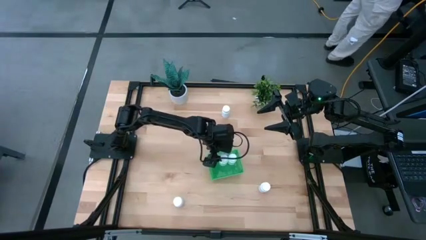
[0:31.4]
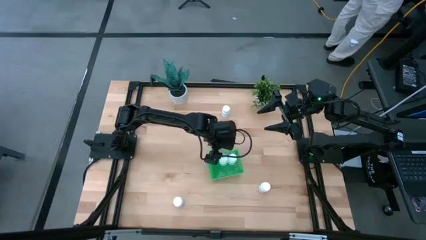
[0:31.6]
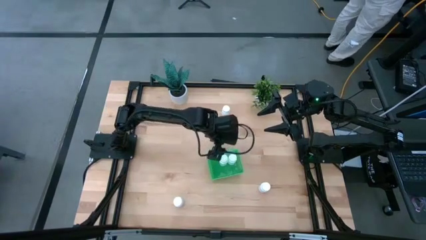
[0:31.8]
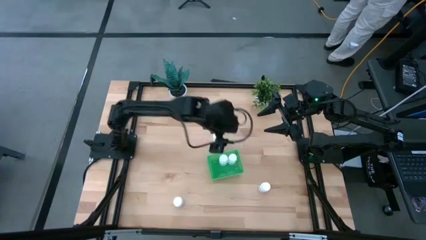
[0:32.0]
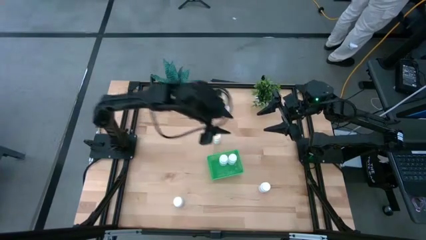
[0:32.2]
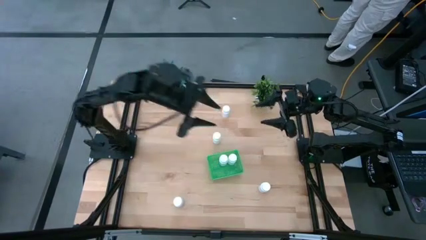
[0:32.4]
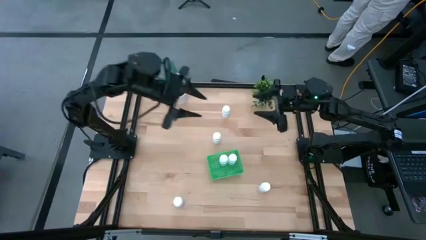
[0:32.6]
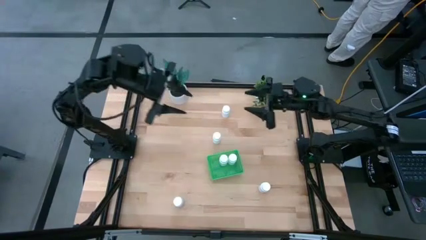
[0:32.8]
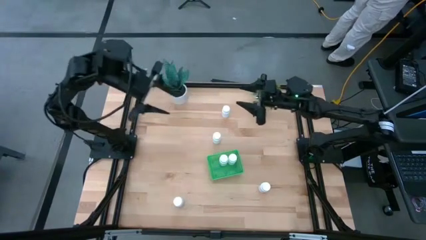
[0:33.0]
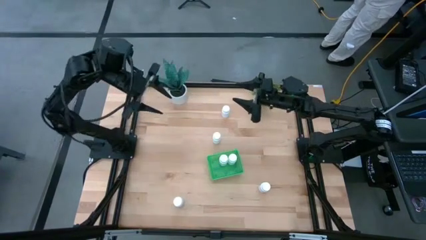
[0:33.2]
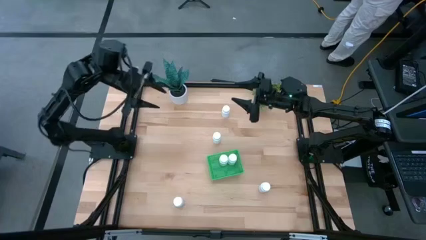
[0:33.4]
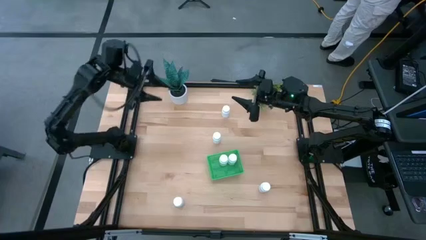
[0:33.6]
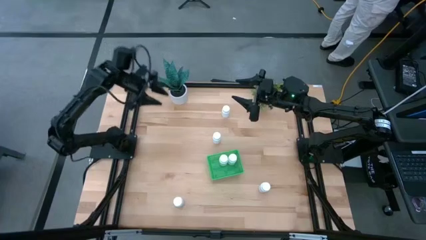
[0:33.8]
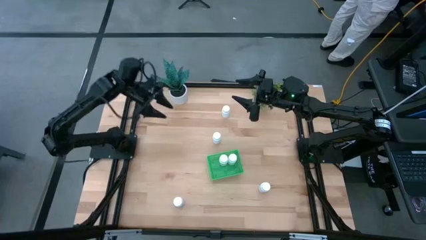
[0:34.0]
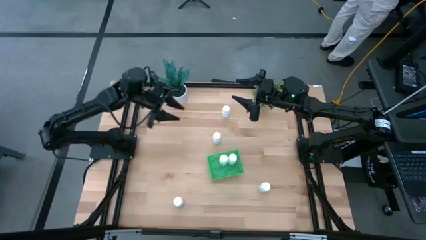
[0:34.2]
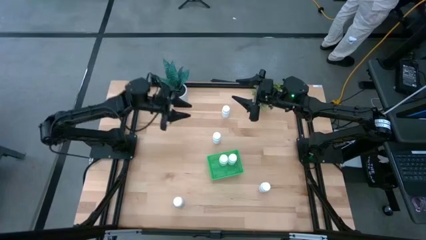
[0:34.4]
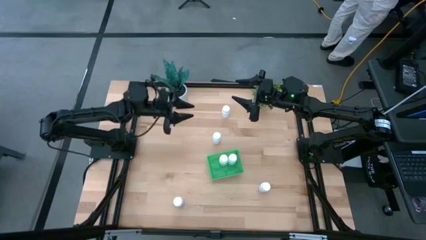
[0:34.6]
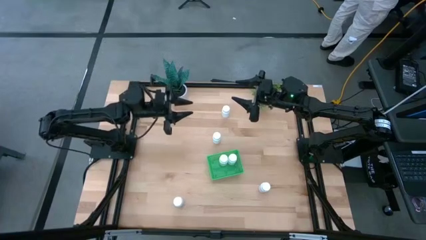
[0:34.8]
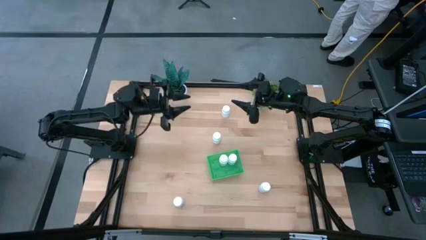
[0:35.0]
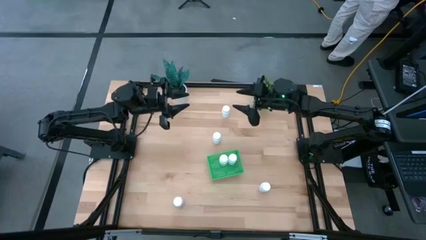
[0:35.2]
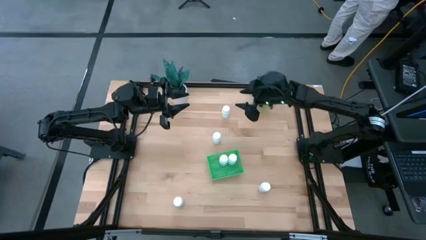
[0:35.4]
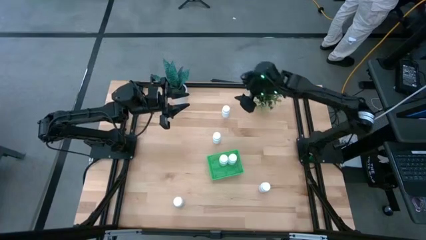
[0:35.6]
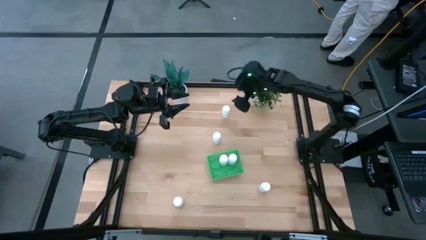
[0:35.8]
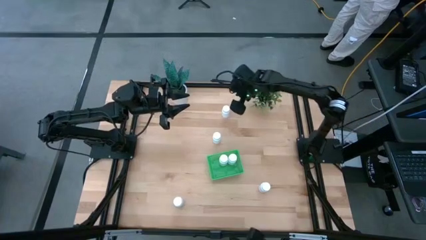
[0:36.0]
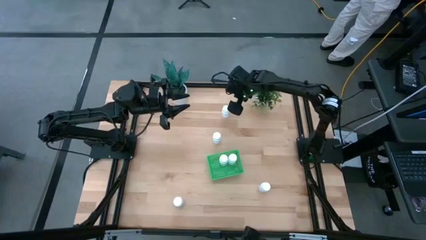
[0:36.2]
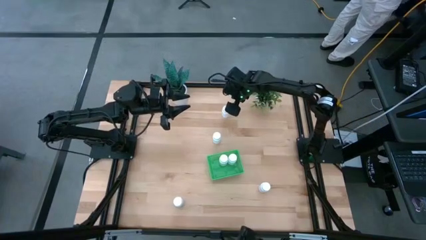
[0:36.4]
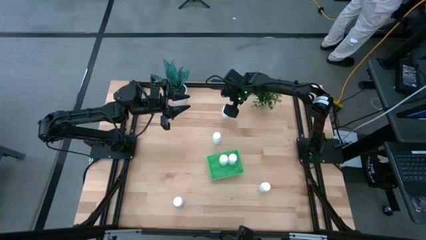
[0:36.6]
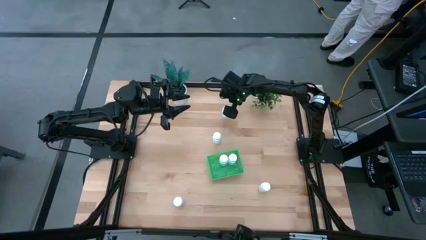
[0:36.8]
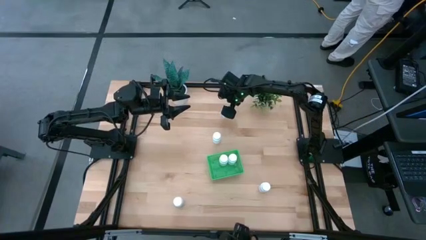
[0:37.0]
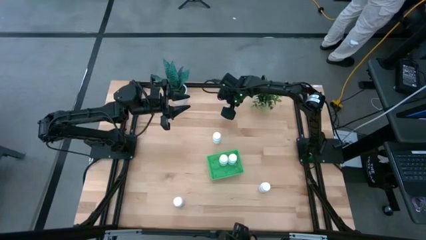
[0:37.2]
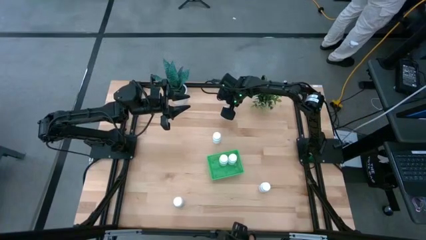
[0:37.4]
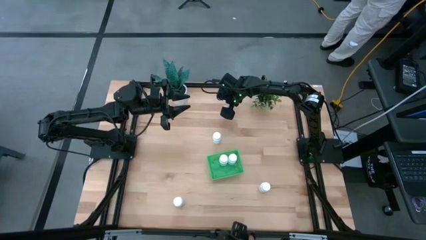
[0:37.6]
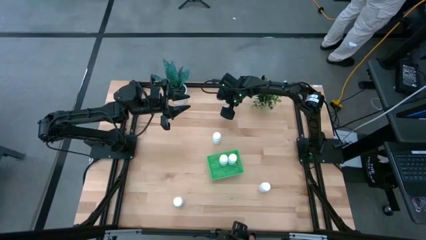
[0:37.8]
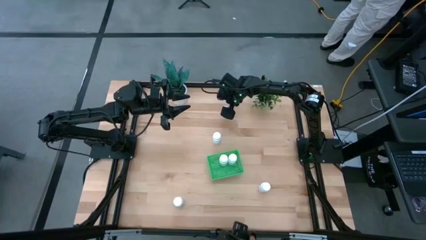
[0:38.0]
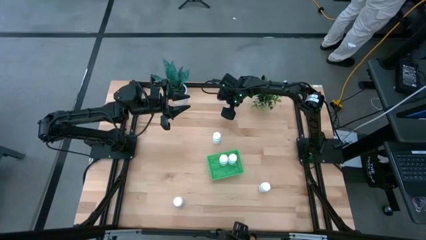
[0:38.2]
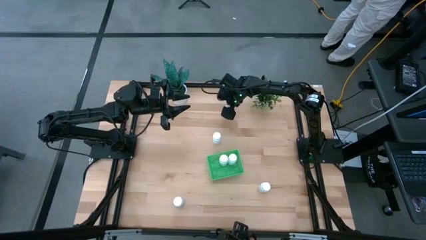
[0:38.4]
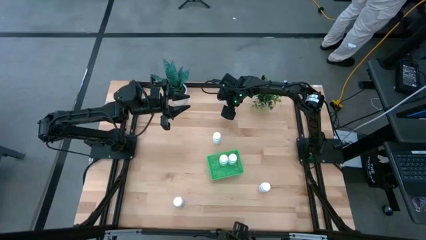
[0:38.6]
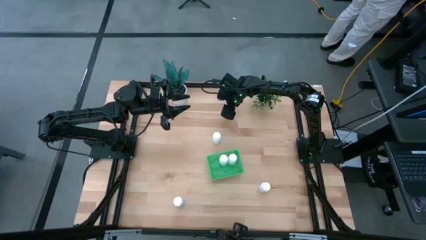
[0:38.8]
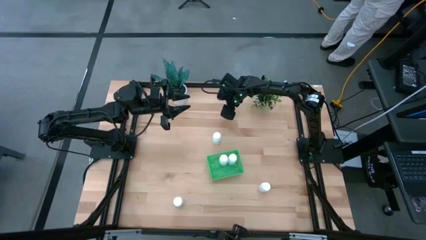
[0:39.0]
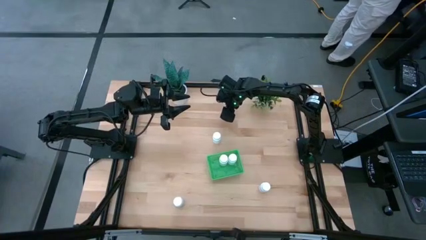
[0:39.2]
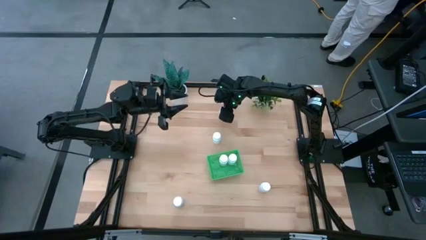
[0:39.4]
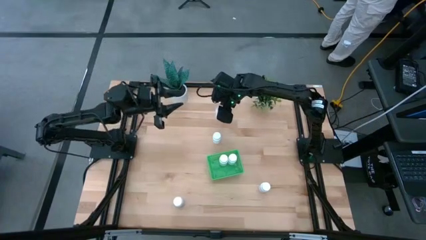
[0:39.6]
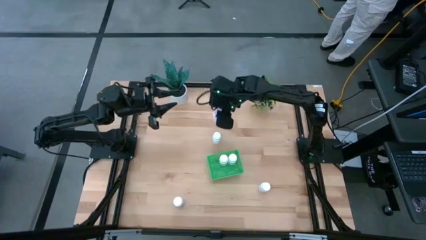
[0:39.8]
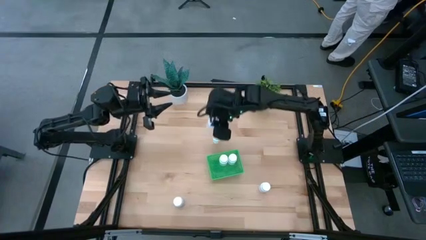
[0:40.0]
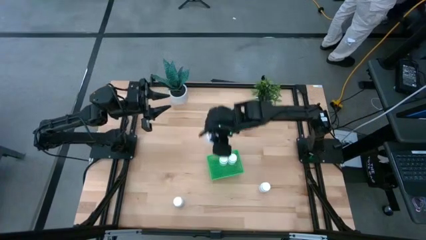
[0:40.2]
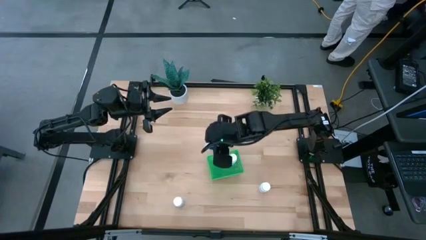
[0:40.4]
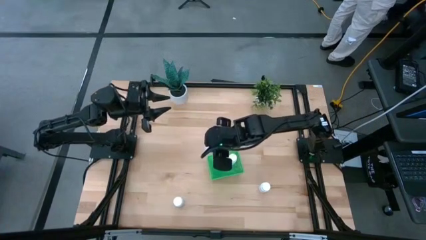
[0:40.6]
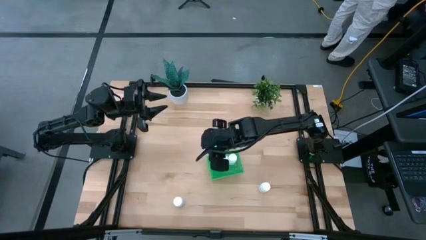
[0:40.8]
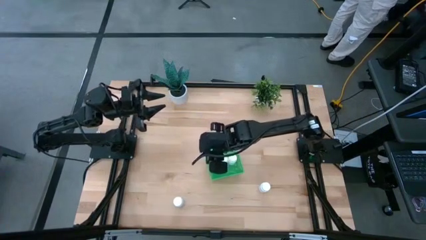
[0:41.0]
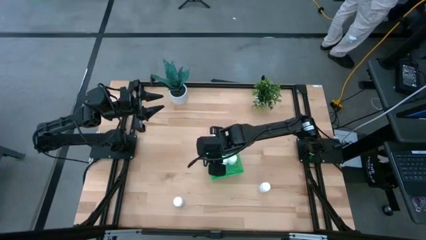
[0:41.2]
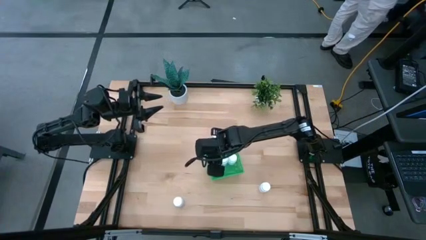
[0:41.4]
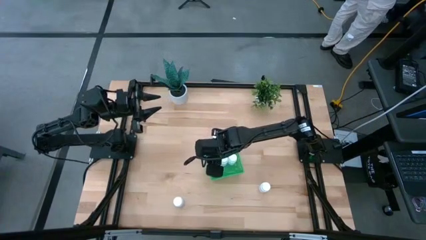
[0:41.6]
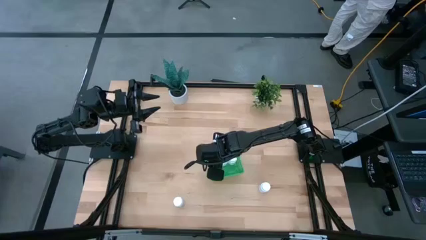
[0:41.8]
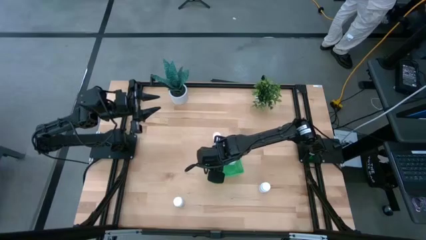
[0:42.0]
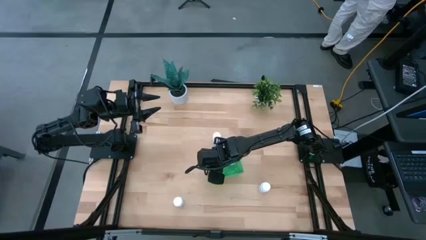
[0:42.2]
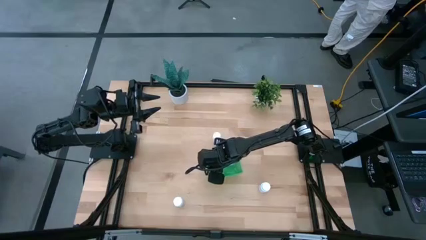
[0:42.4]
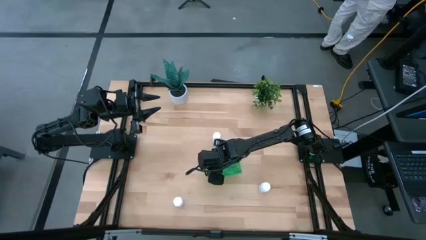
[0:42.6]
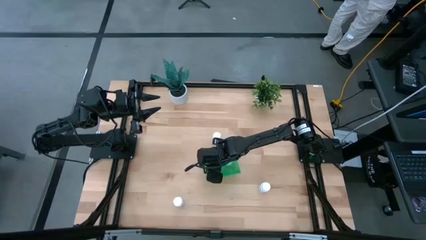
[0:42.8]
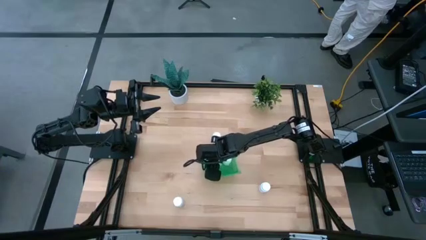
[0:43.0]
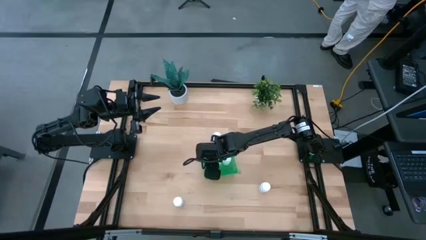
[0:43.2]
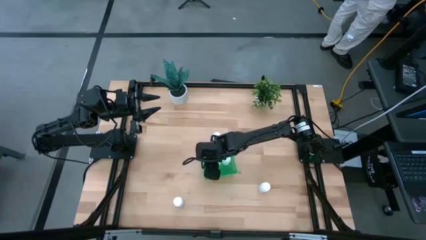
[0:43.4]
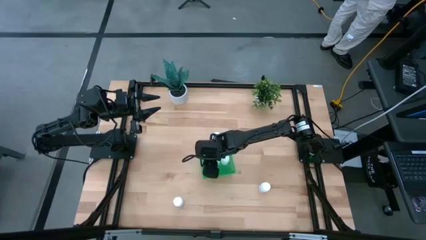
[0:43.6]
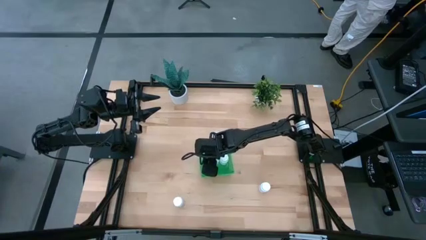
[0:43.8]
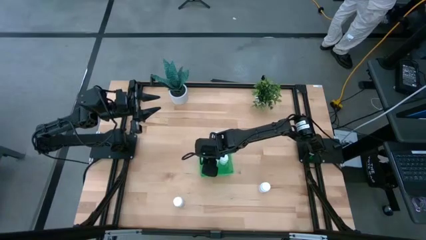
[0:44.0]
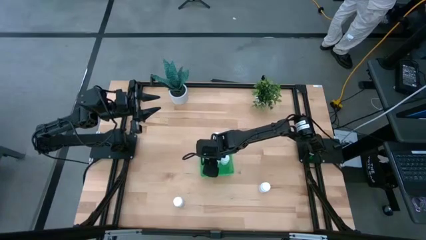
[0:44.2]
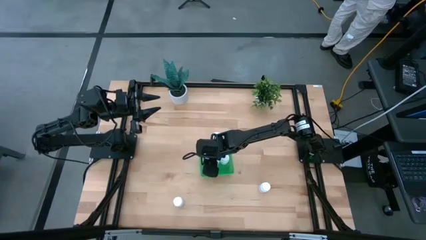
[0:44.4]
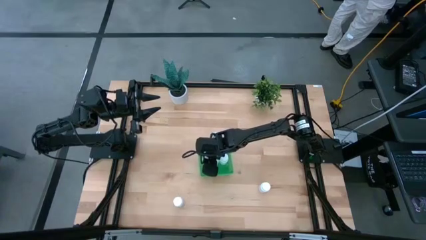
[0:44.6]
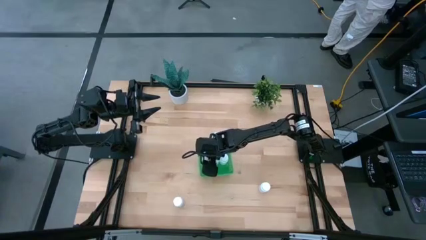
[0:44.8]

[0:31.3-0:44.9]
Task: Pick and place pill bottles into a basket
Put the white medicine bottle into the green basket

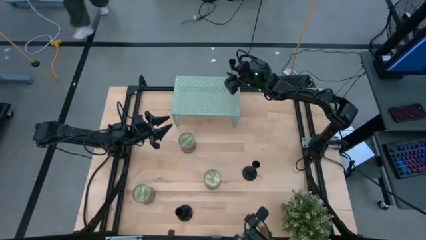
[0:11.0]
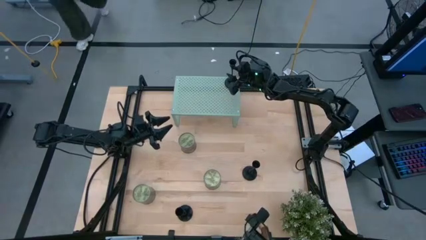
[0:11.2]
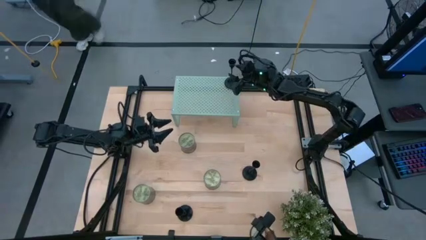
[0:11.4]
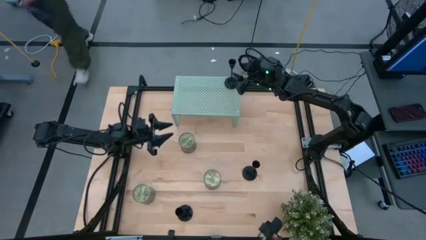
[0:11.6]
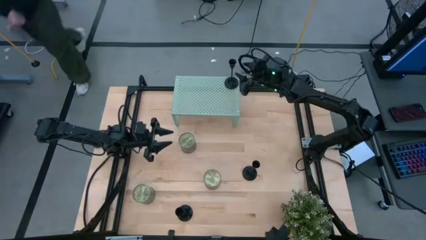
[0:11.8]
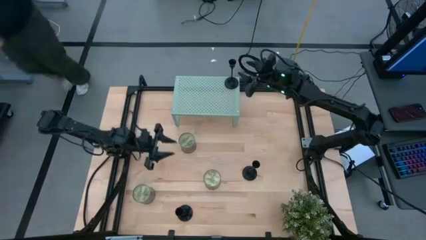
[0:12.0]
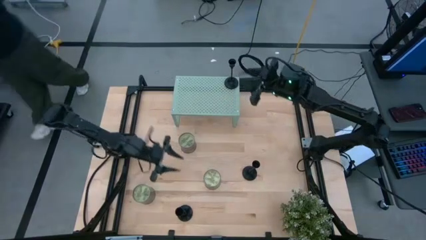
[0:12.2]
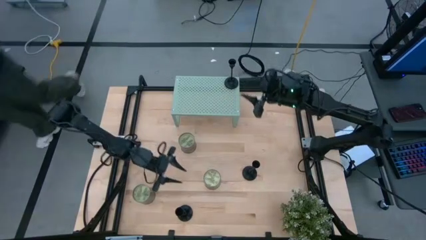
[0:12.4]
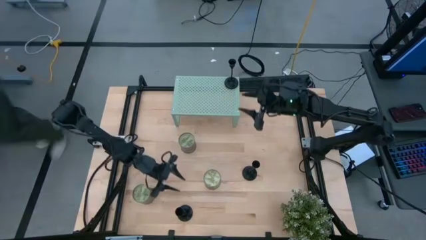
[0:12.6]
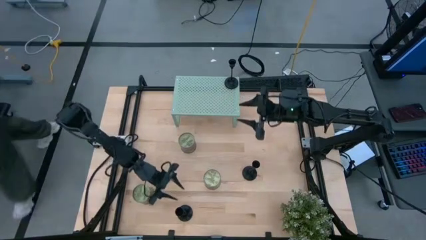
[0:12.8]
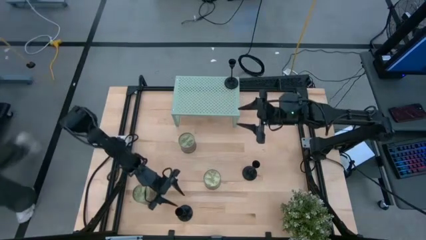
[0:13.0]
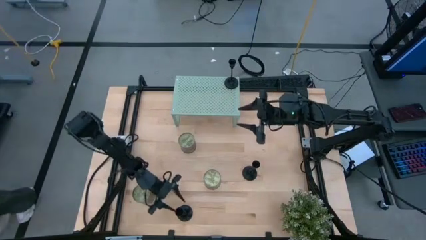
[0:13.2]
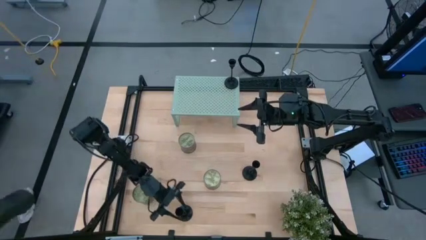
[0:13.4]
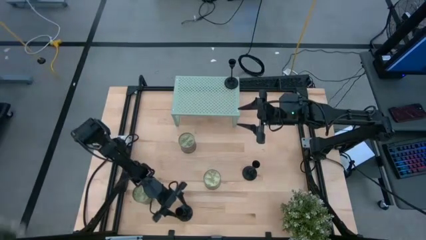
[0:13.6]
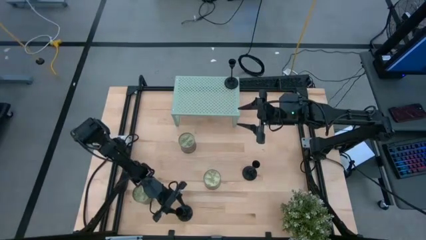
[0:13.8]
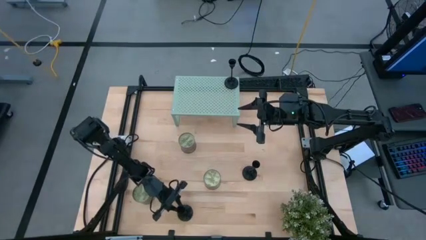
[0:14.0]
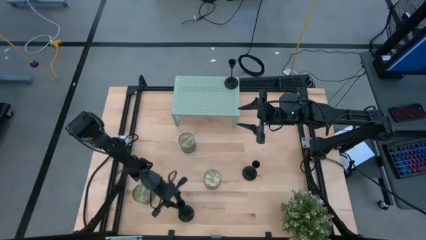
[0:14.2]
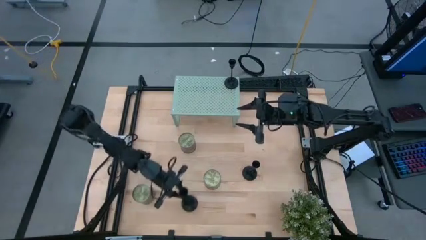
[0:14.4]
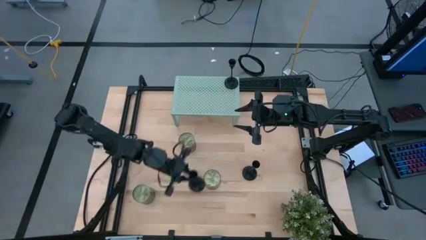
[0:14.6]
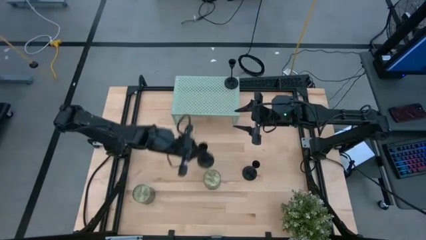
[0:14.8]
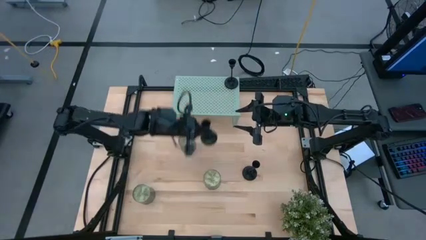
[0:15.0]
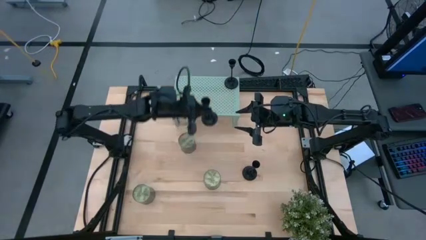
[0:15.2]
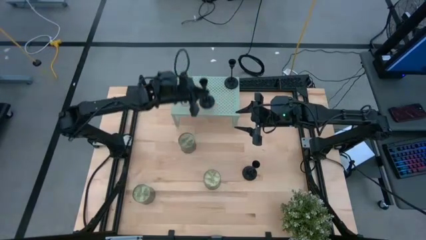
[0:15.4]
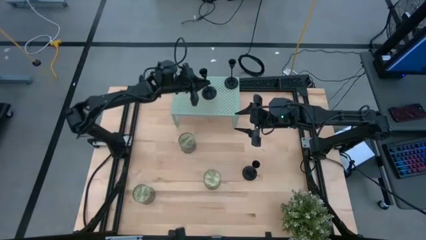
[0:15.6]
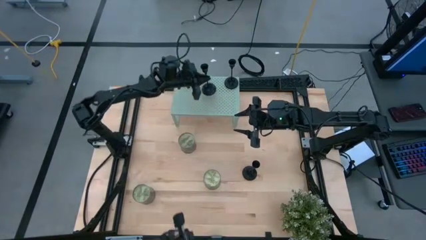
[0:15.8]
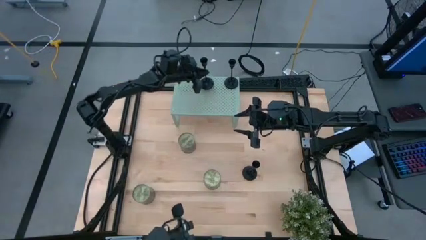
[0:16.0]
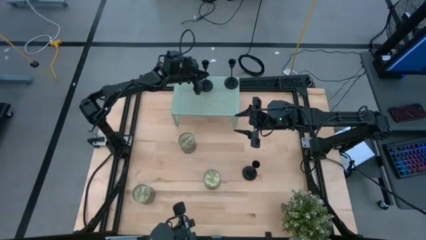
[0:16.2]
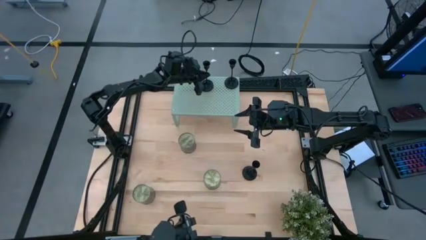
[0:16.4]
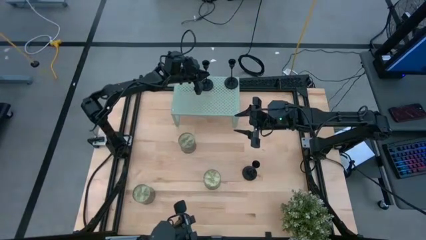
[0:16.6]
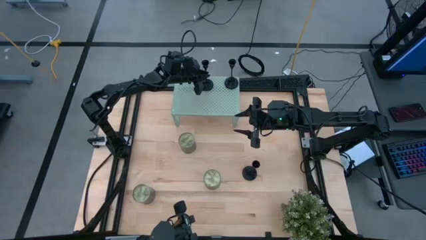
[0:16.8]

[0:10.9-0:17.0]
Task: Pick & Place candle stick holders
Put the bottom black candle holder on the shelf
